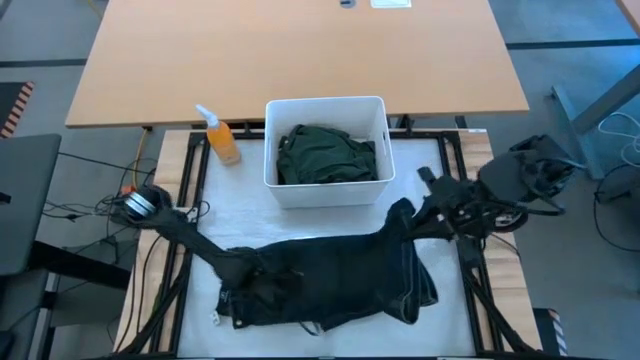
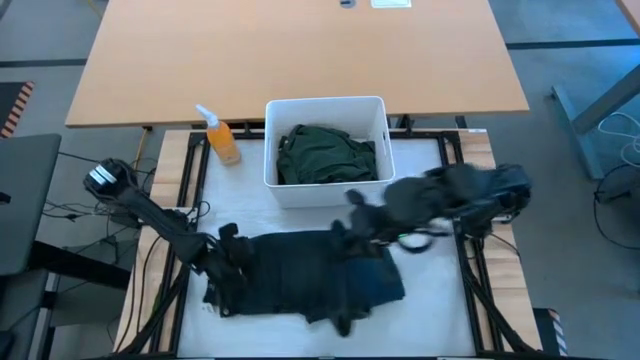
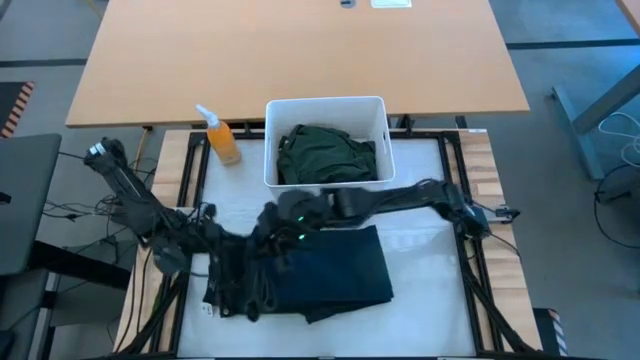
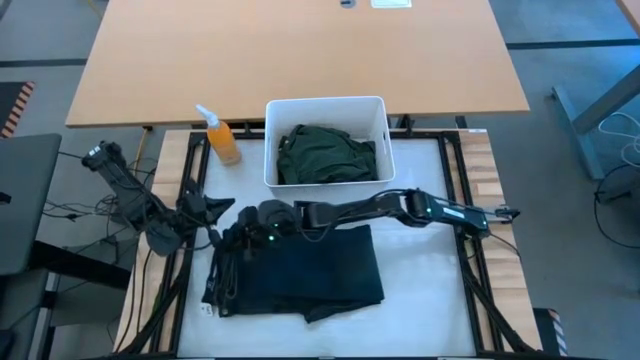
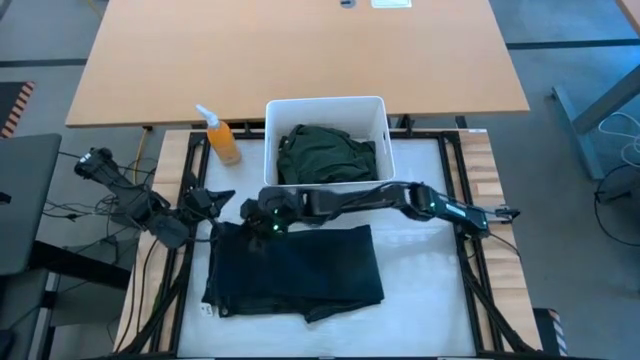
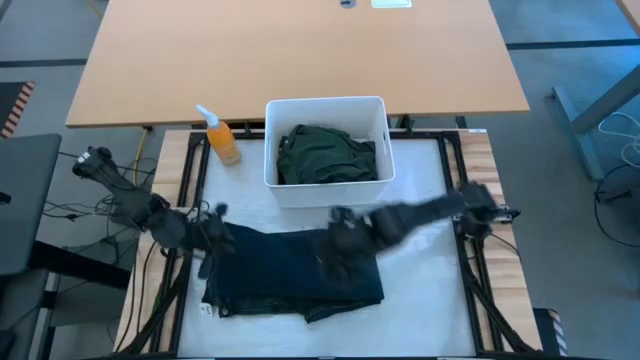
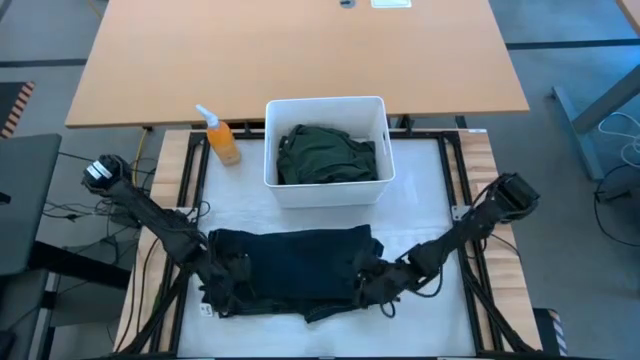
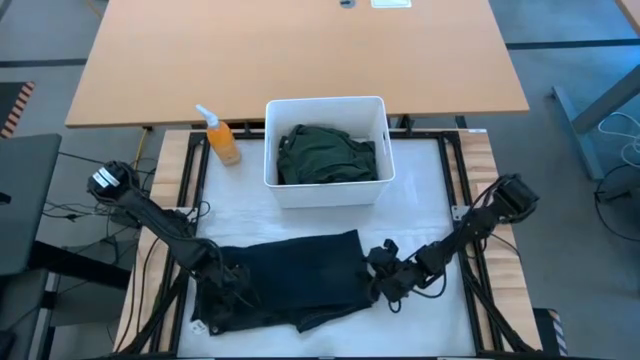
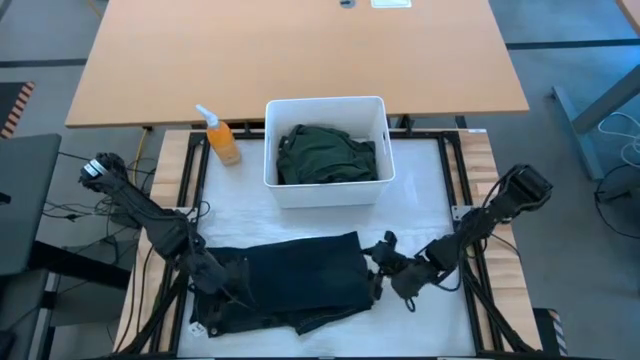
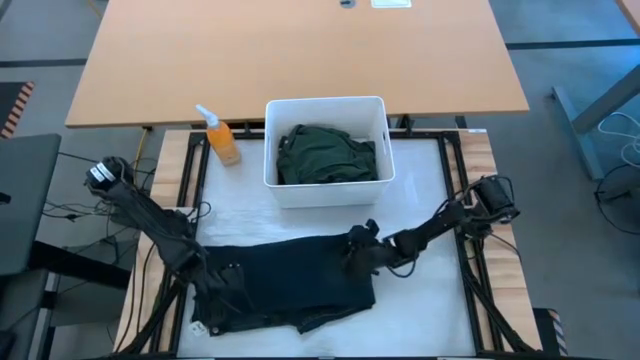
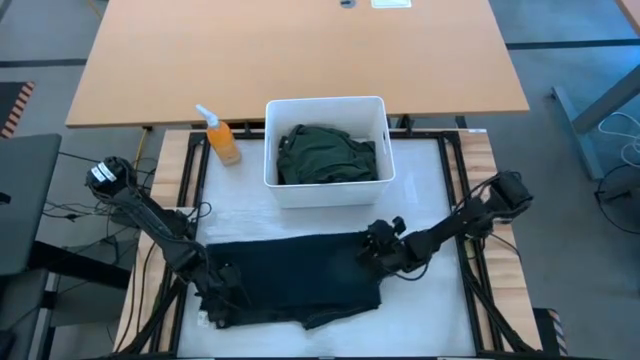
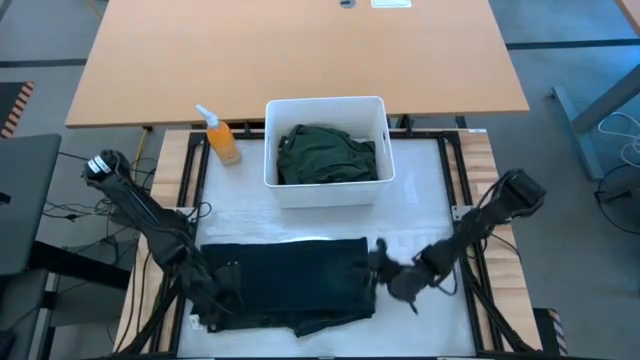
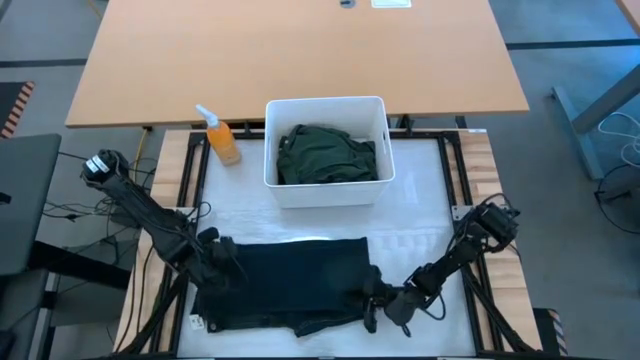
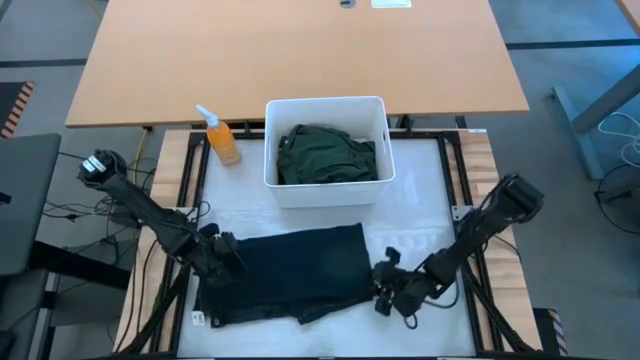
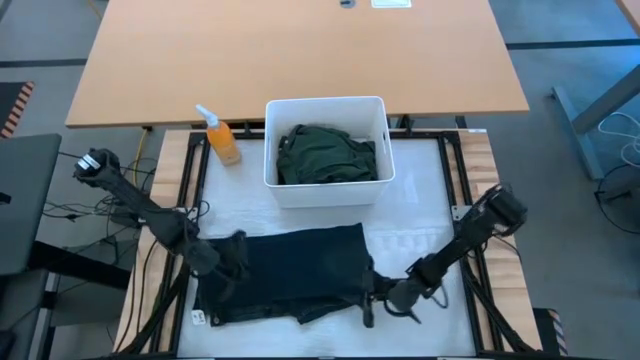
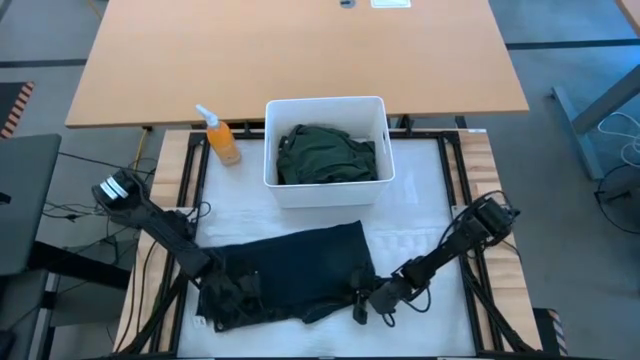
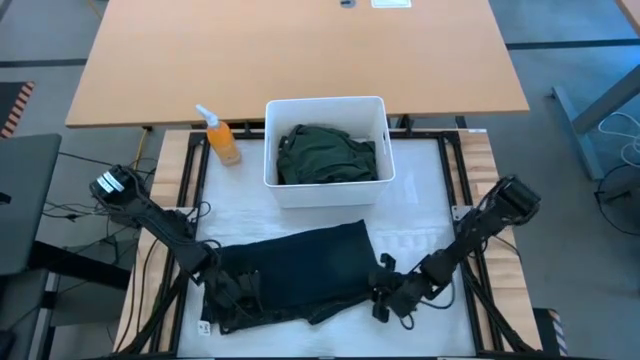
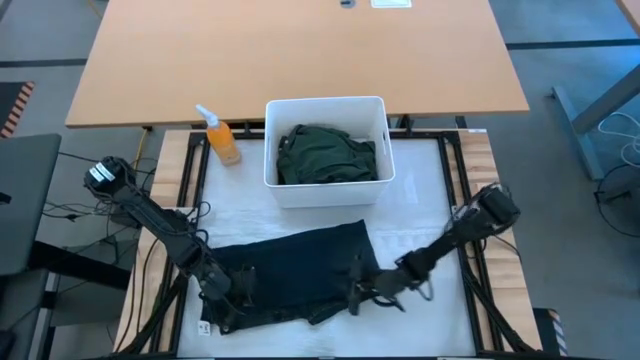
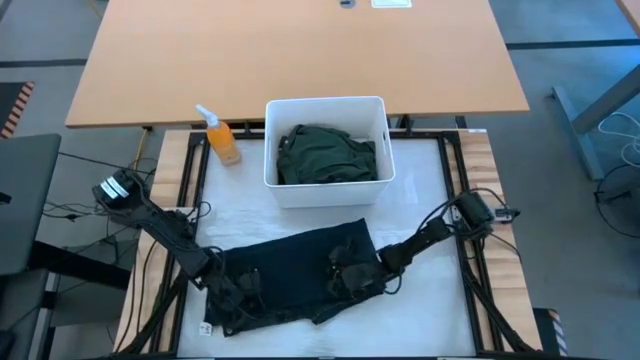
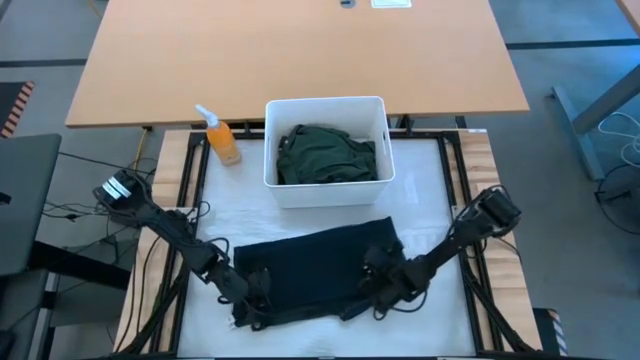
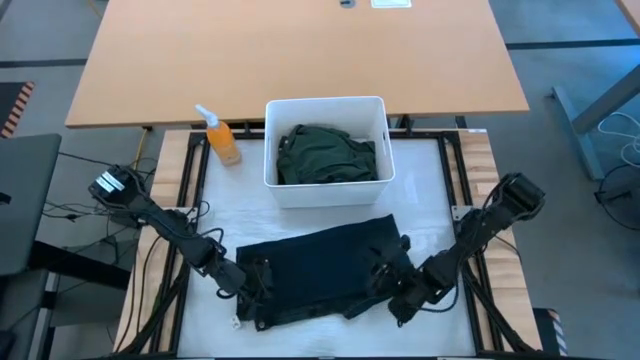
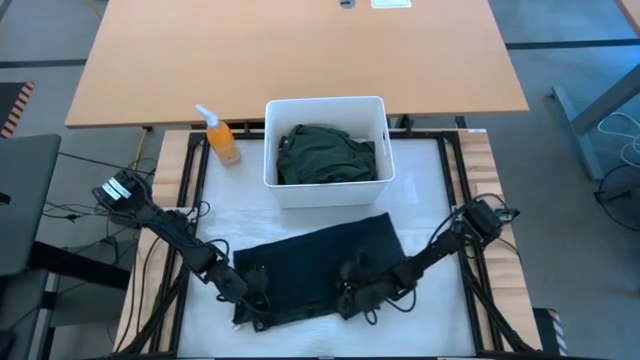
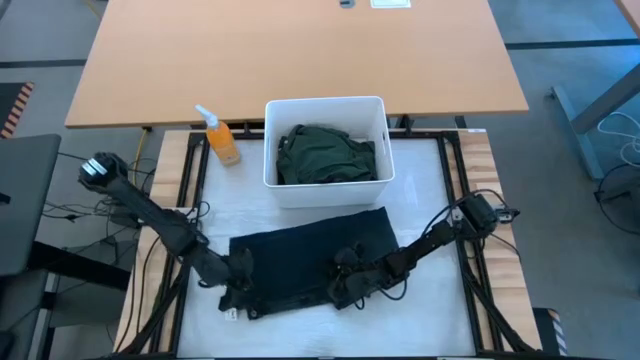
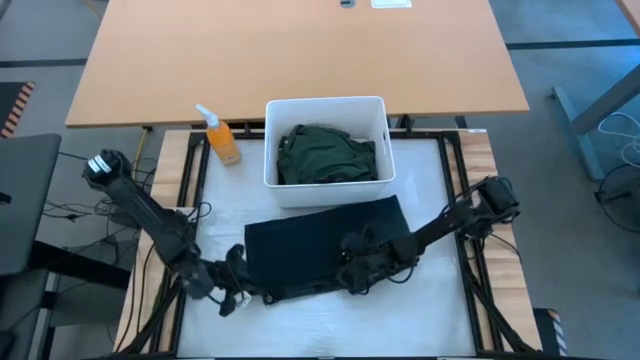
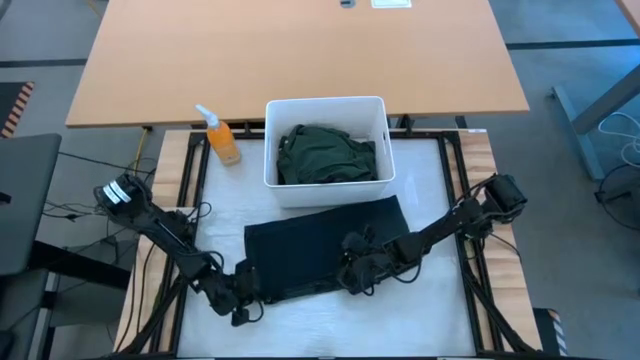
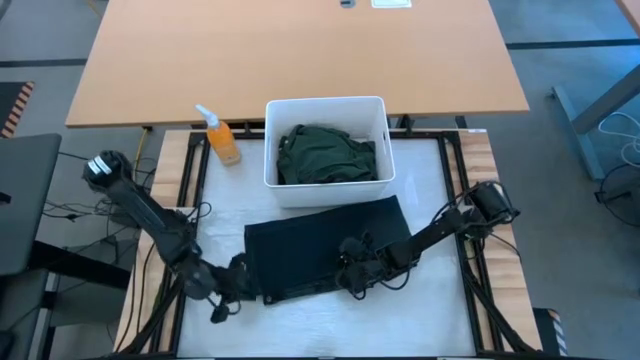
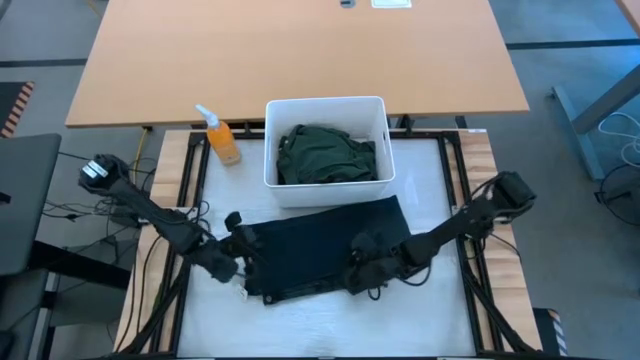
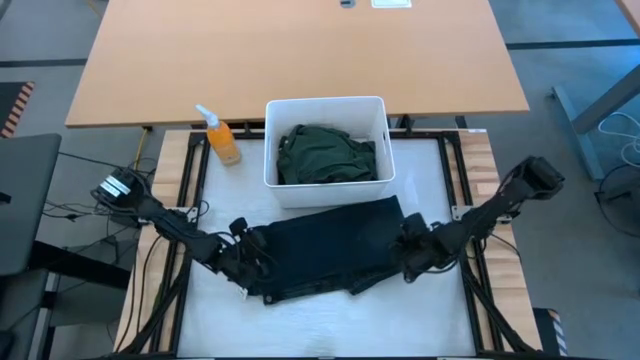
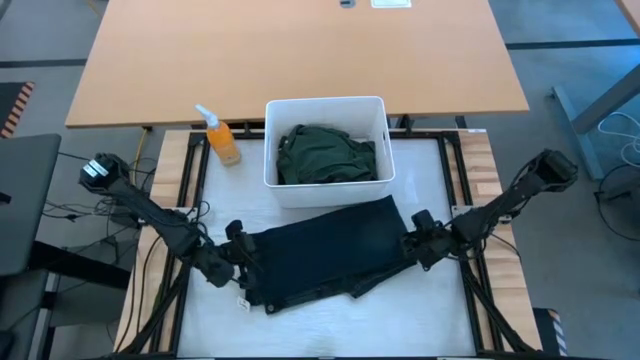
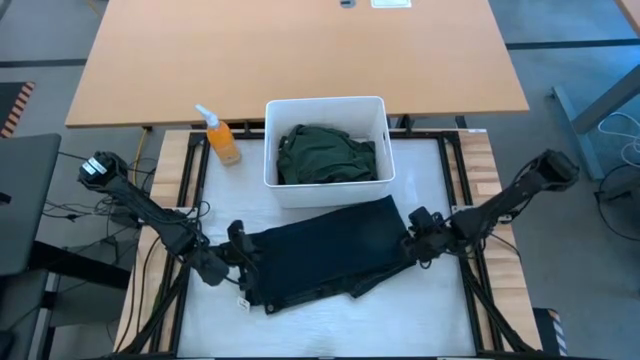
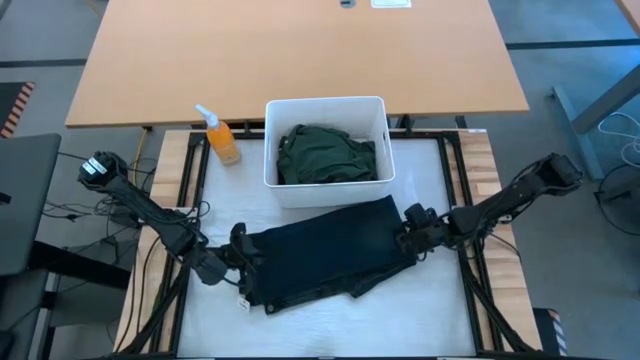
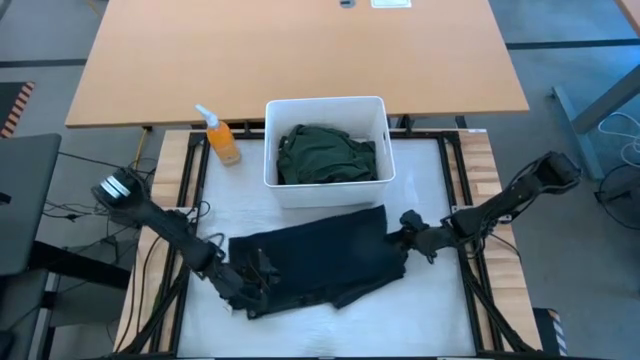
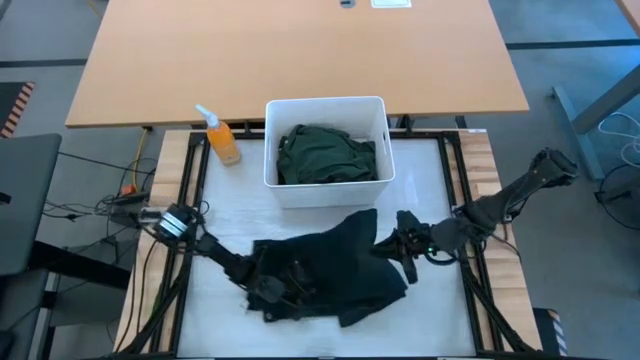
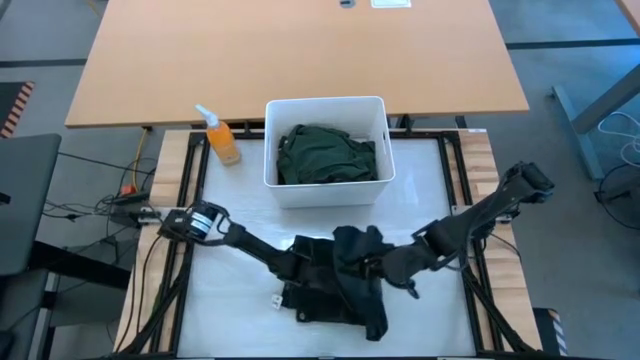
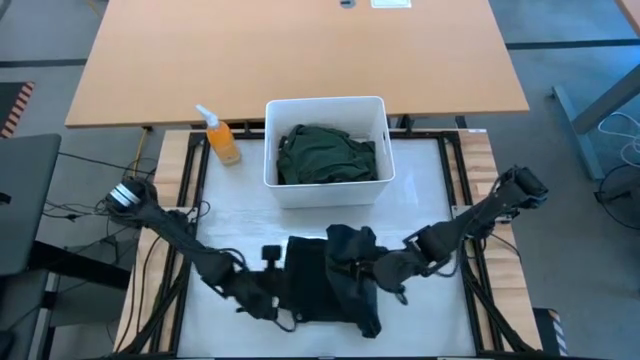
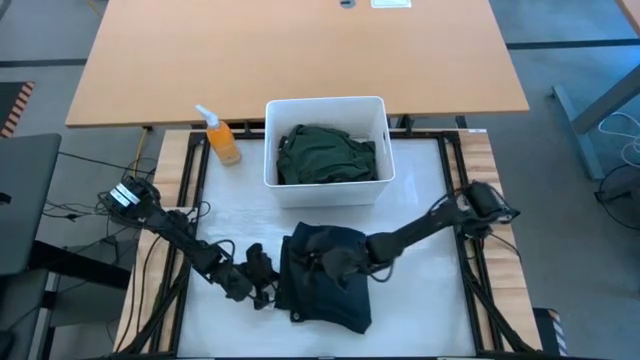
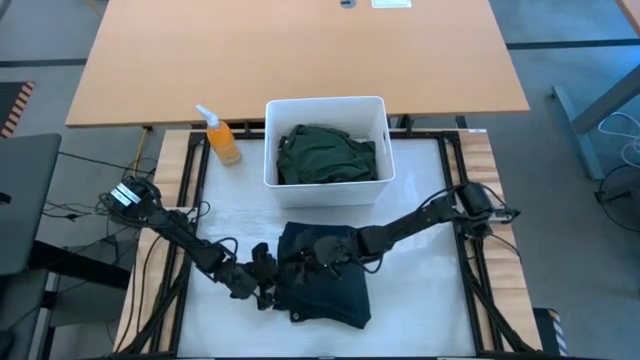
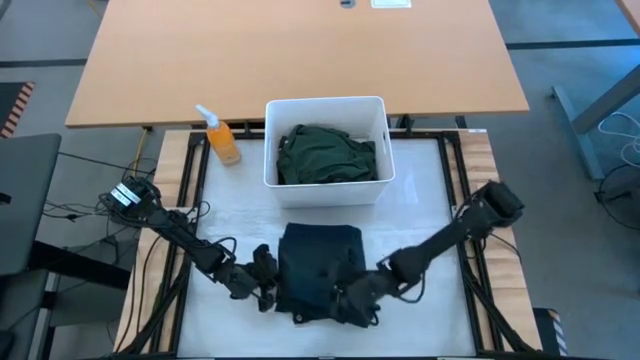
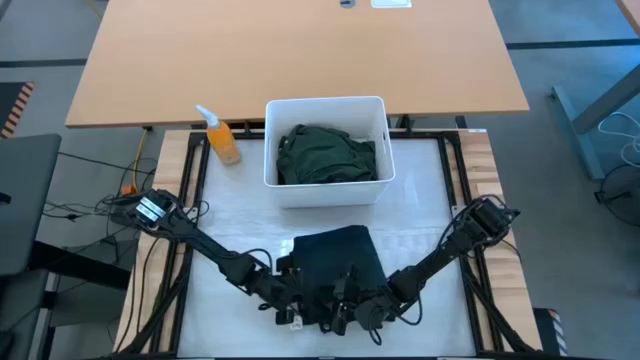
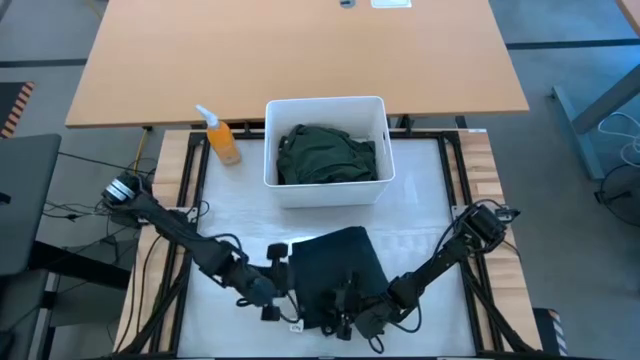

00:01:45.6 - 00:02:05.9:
Task: Fold laundry
Fold the dark blue jeans
